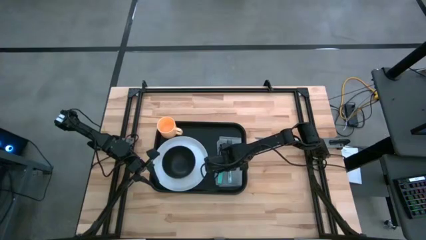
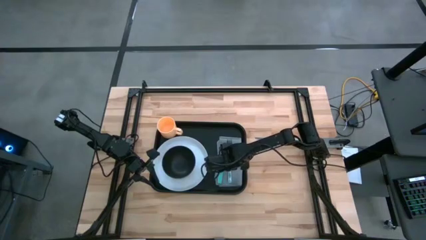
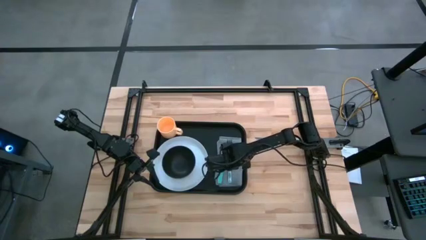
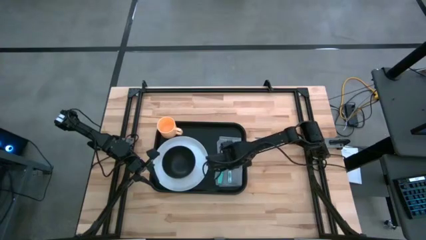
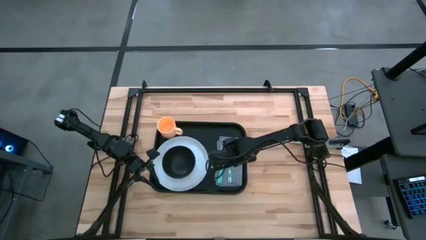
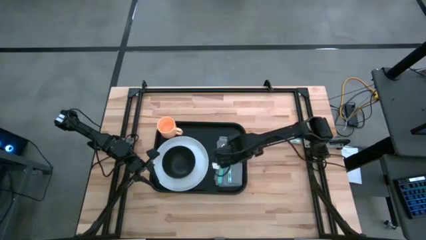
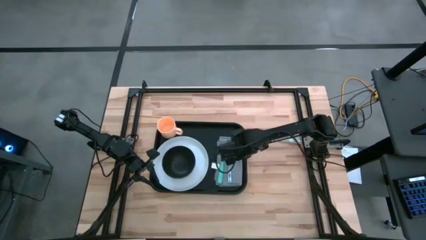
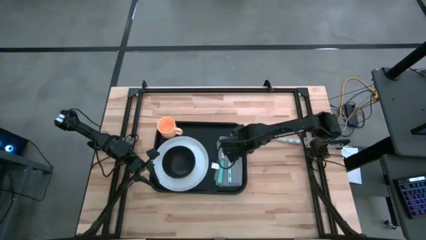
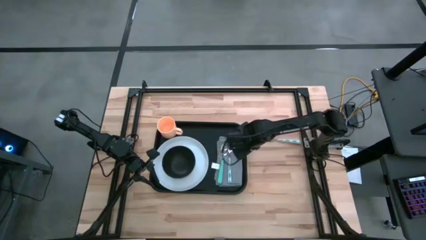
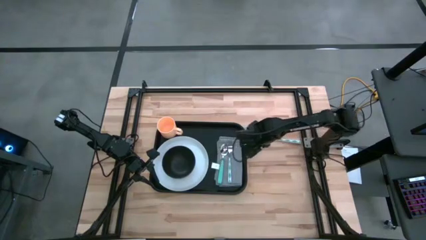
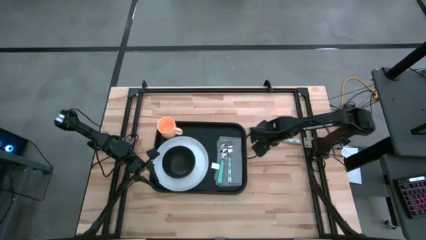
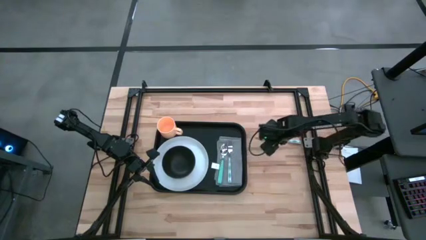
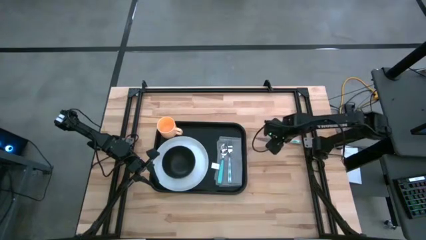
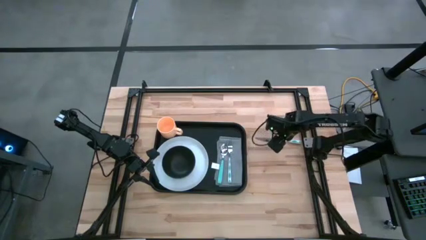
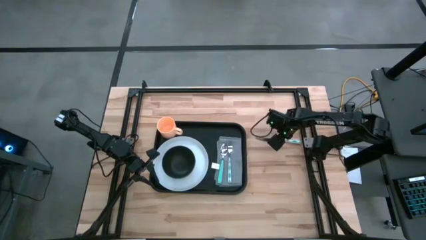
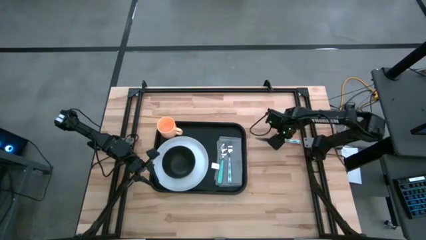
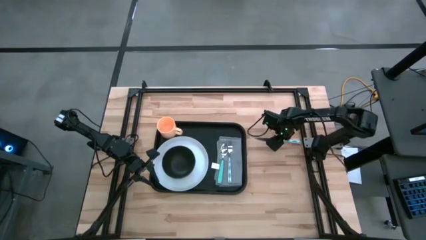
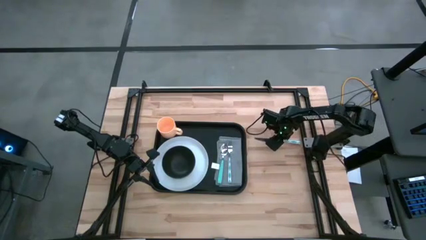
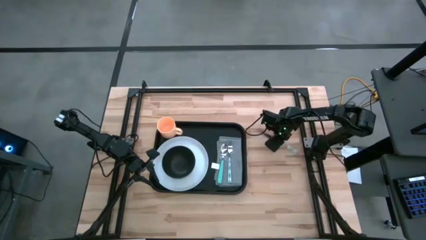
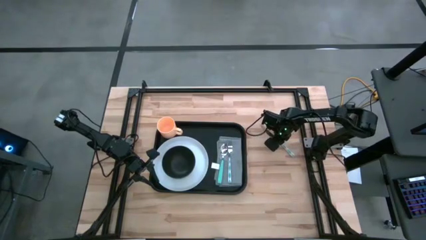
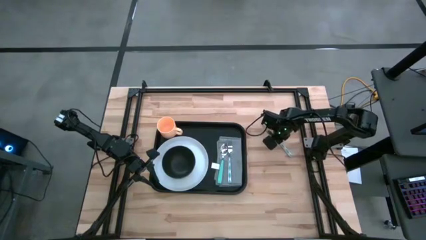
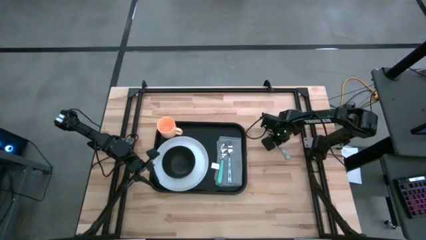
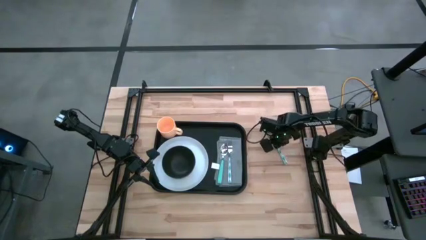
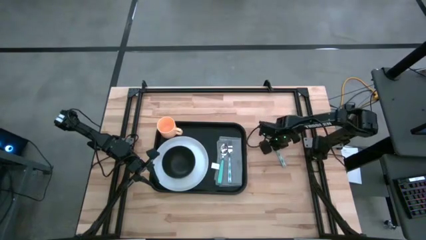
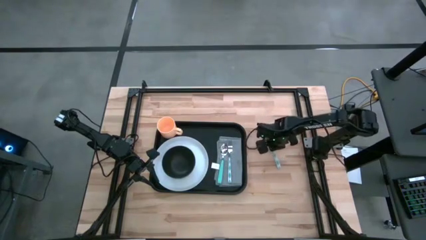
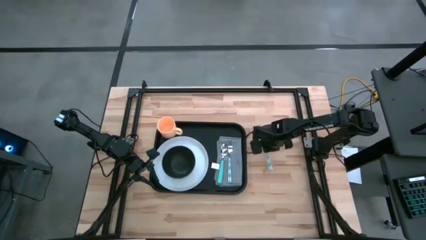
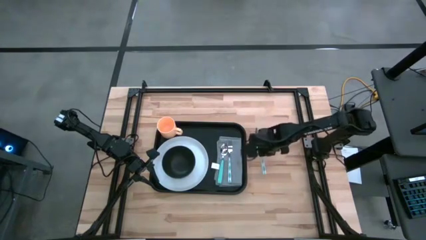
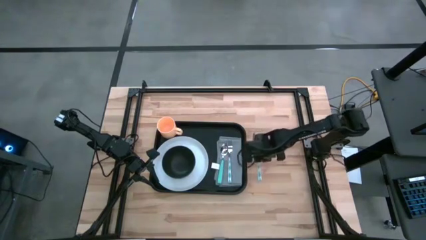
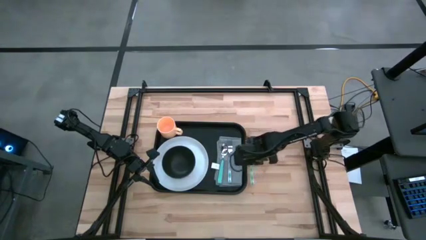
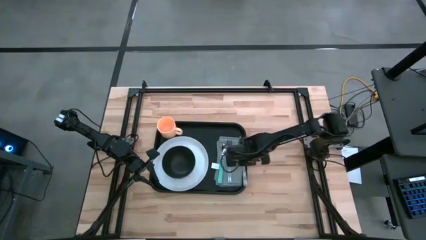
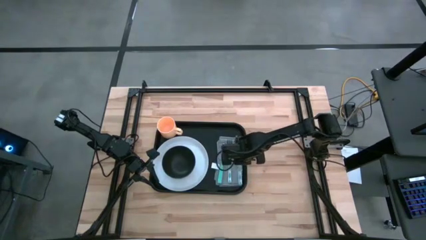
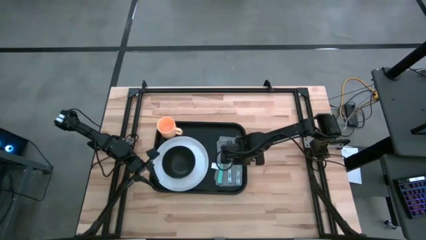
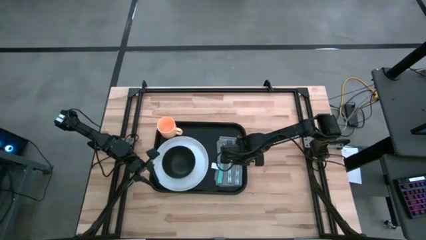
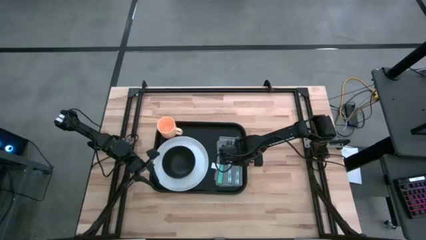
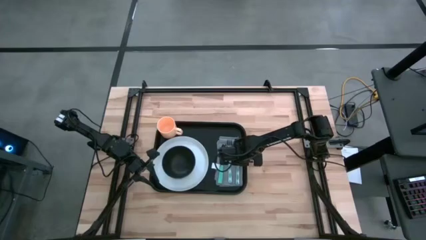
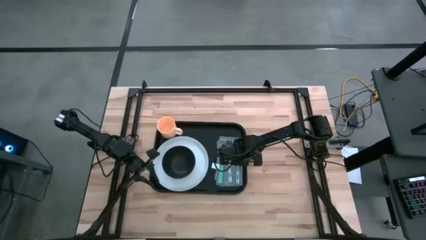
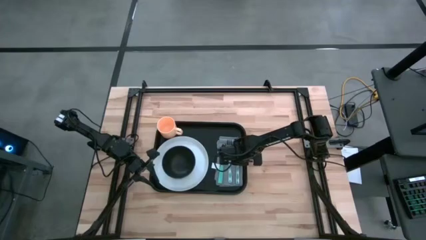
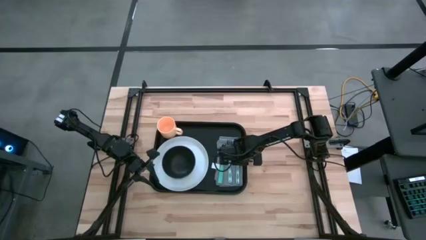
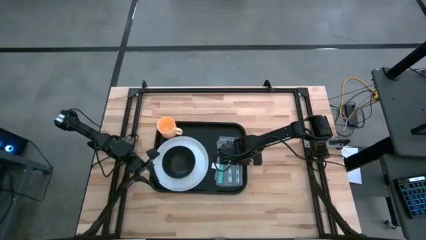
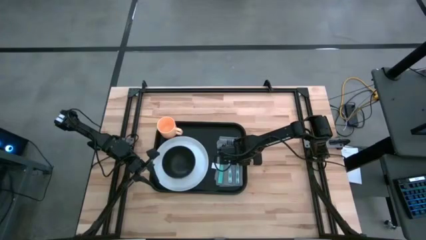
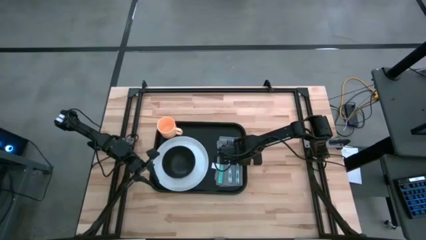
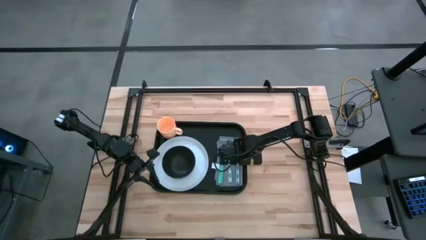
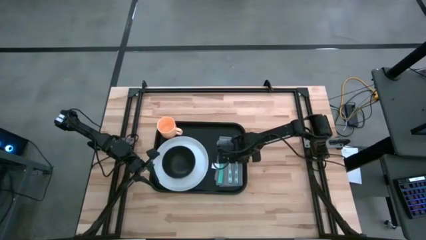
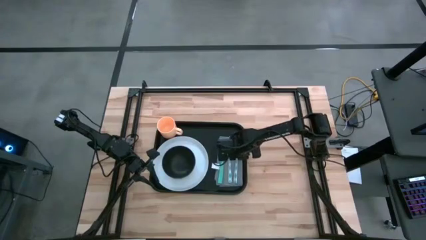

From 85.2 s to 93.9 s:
Task: Set up tray
Put the blue patterned table knife on the right side of the blue patterned fork

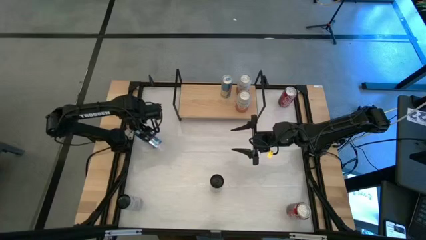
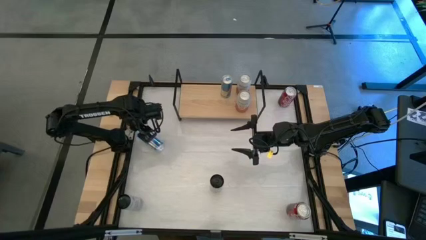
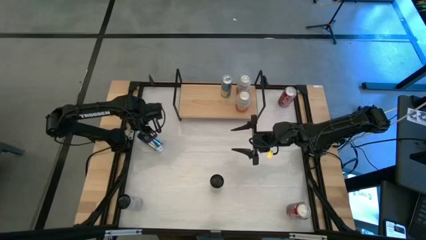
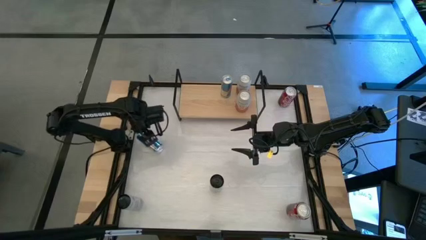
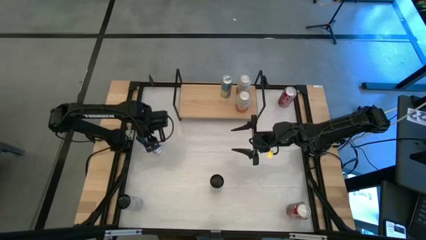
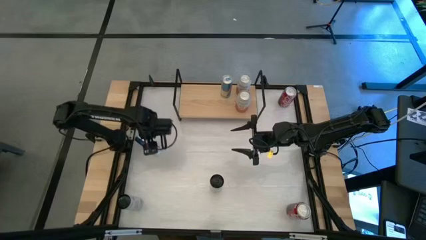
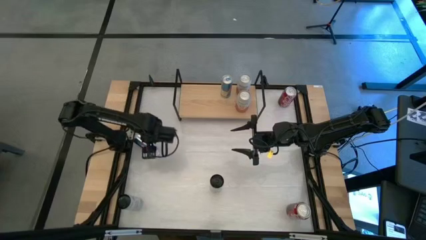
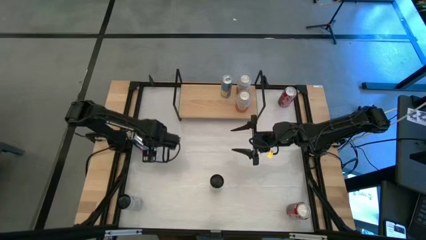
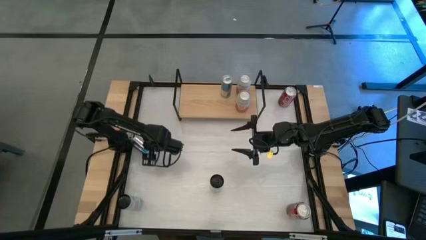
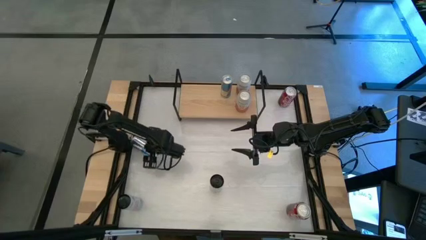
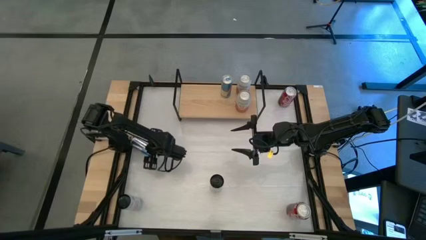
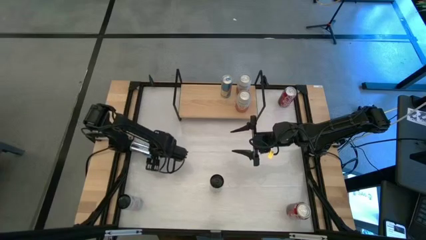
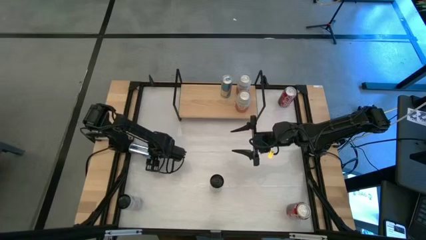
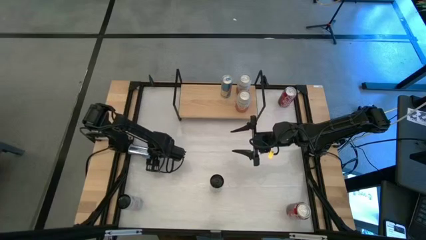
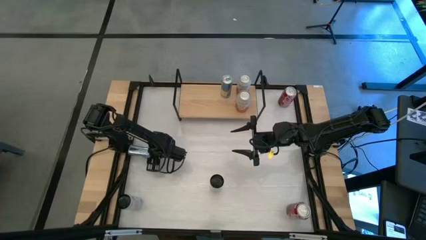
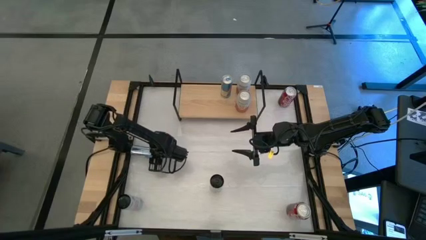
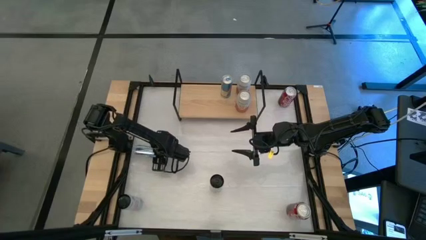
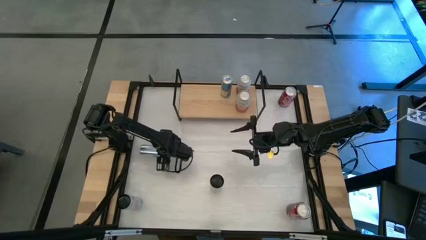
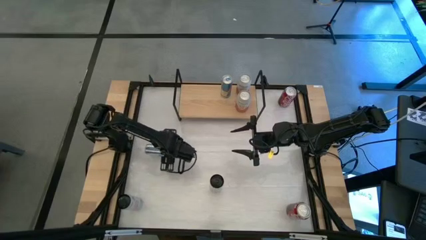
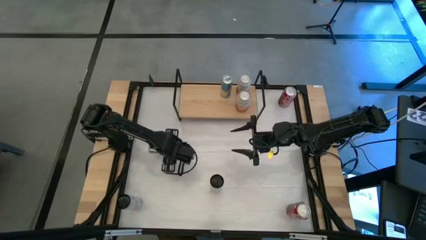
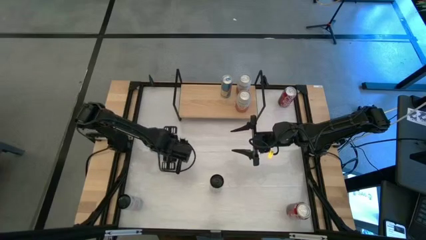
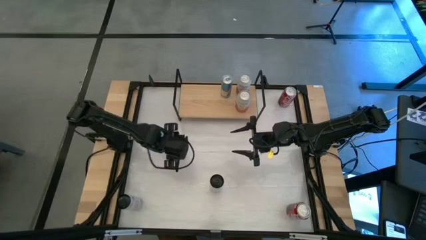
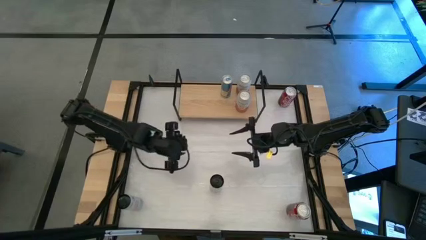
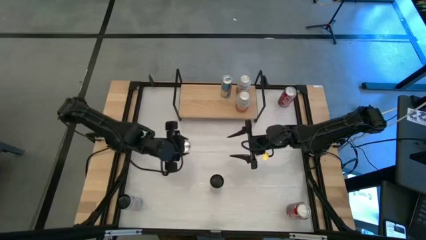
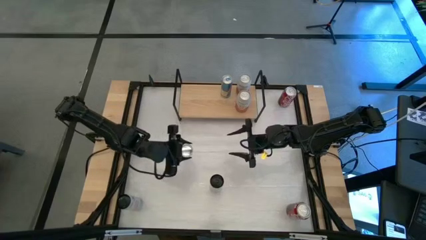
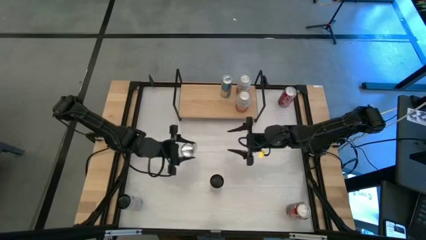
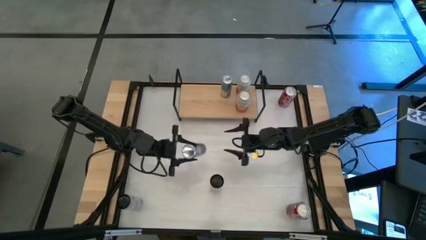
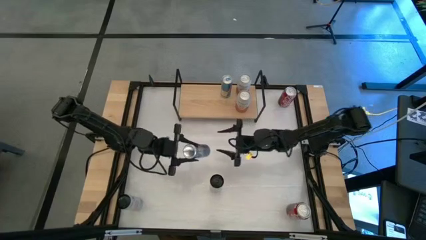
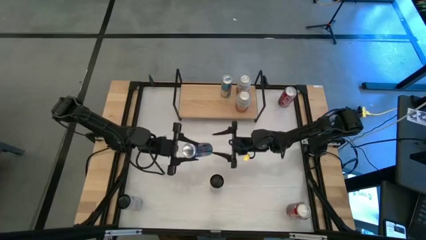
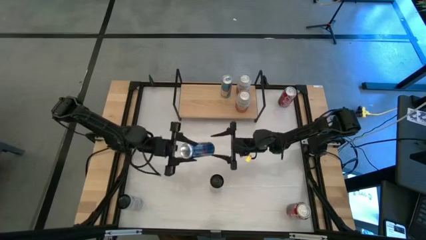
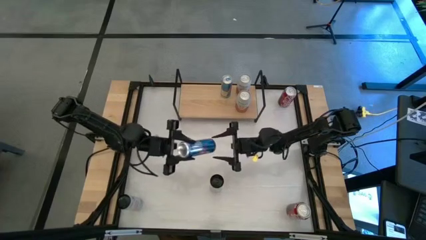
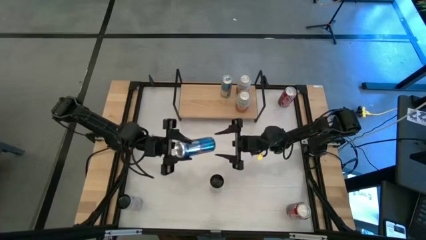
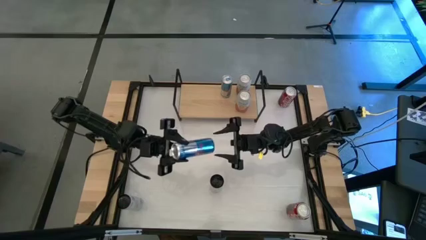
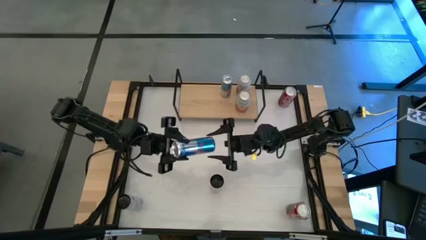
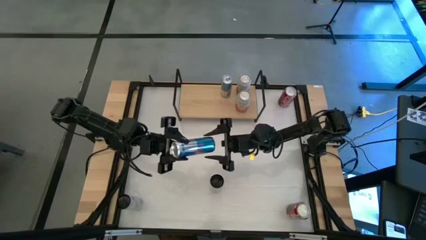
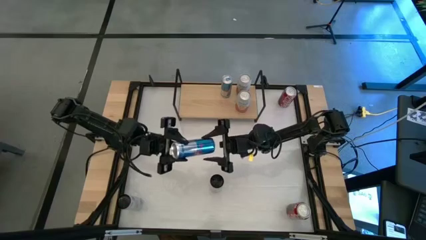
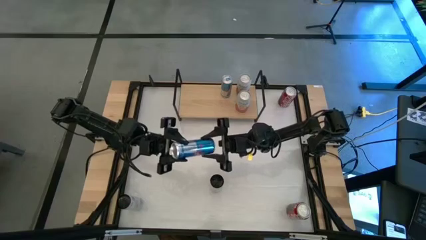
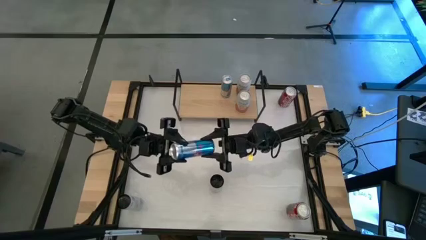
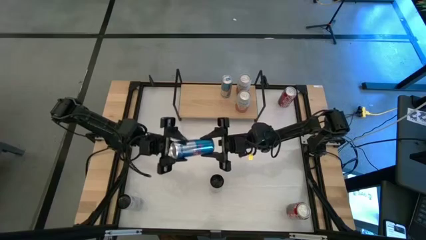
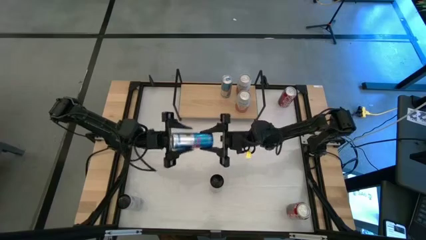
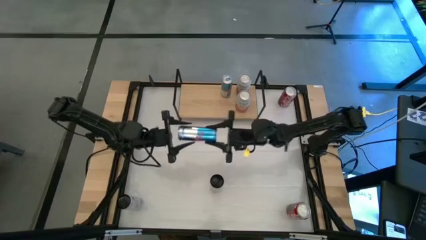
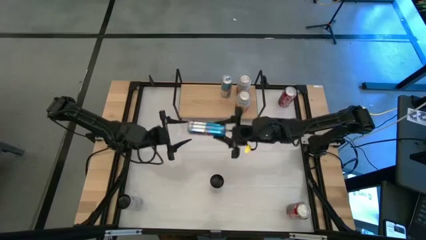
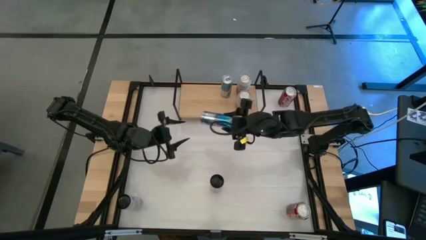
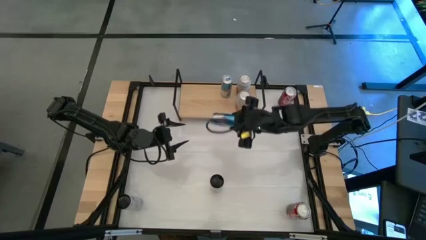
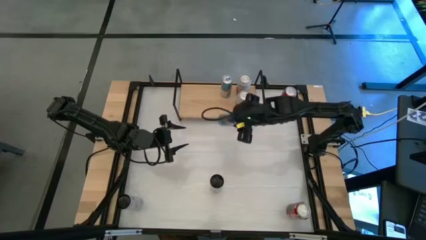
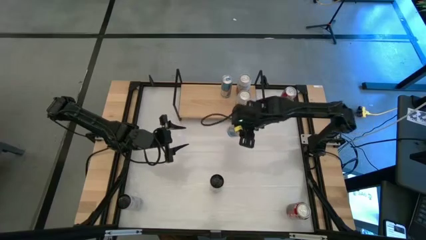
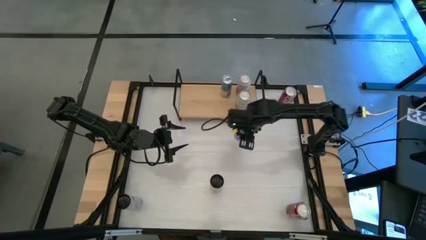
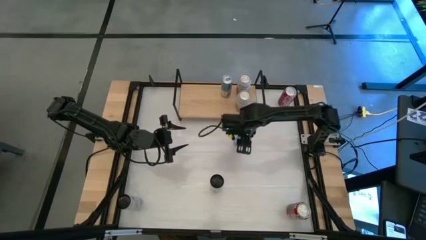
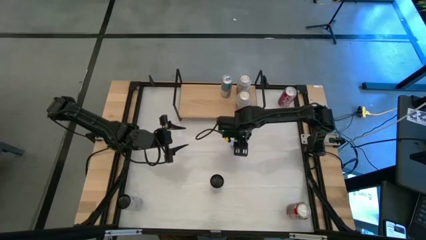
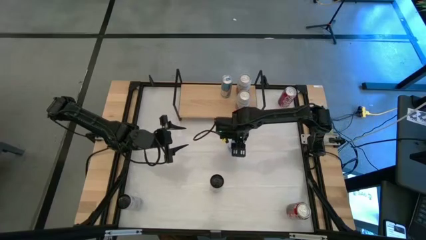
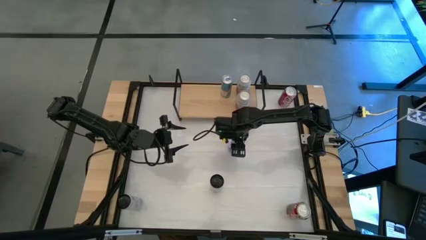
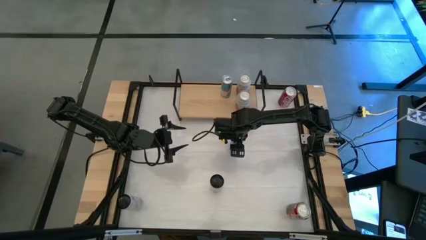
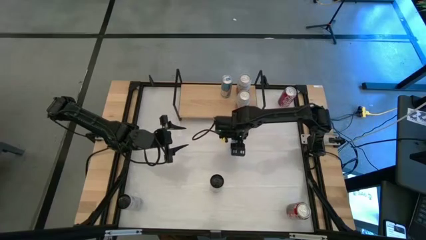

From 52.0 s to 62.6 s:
Task: Place canned beverage on shelf
Move the blue soda can to the center of the table
